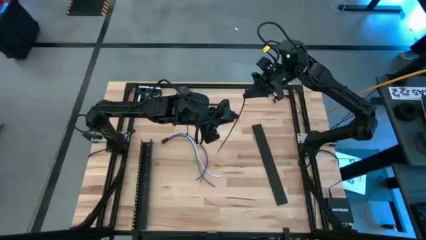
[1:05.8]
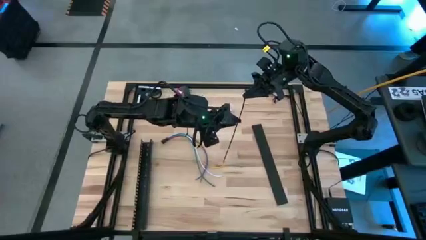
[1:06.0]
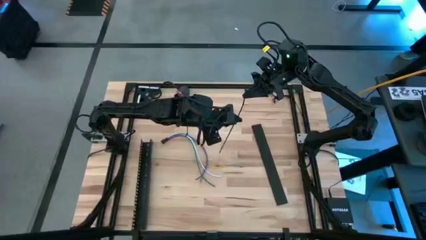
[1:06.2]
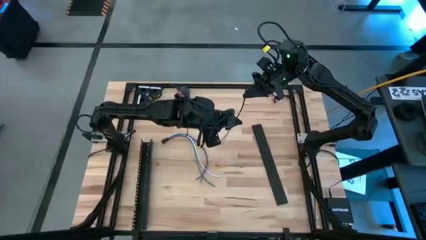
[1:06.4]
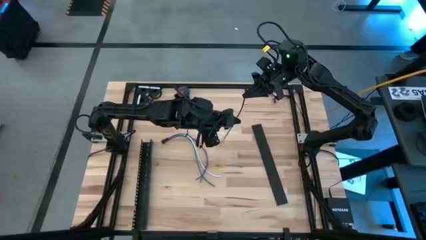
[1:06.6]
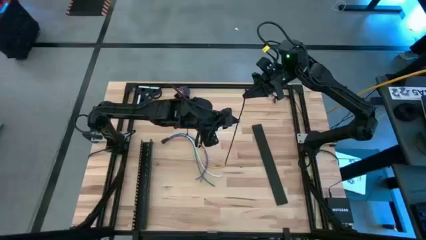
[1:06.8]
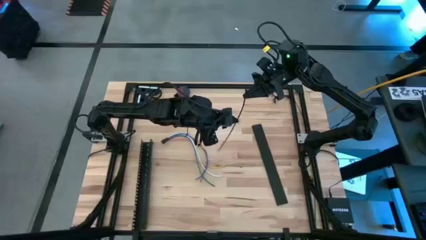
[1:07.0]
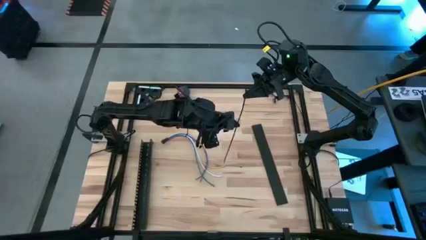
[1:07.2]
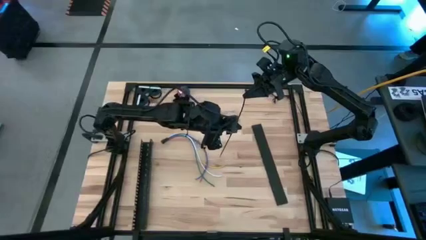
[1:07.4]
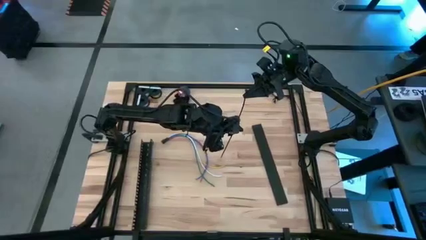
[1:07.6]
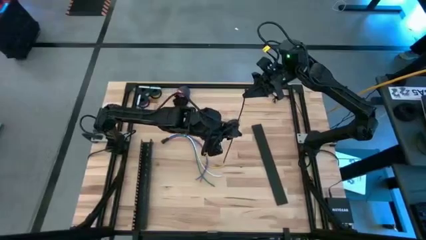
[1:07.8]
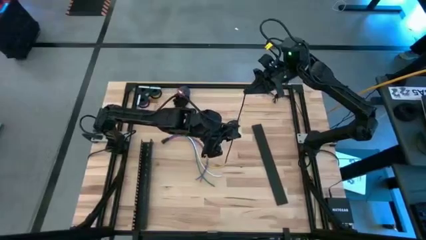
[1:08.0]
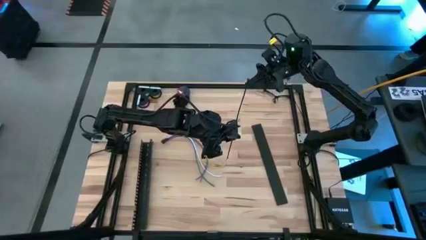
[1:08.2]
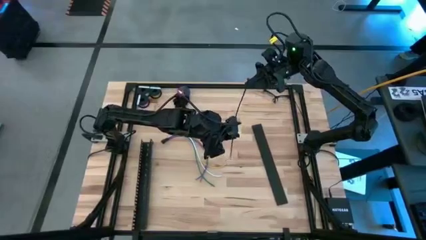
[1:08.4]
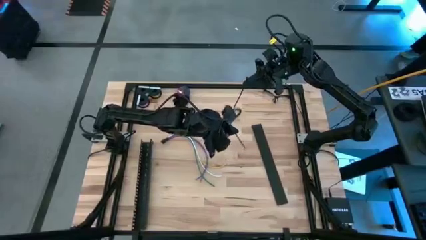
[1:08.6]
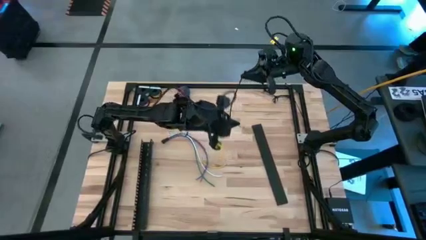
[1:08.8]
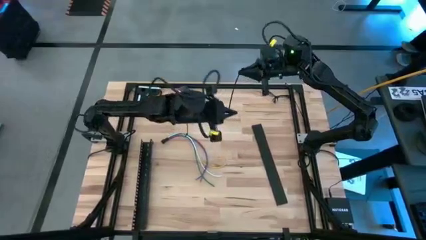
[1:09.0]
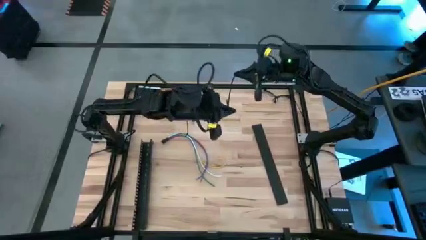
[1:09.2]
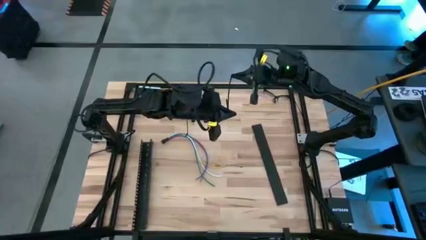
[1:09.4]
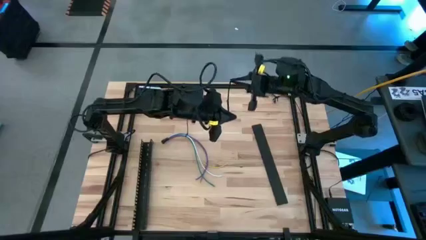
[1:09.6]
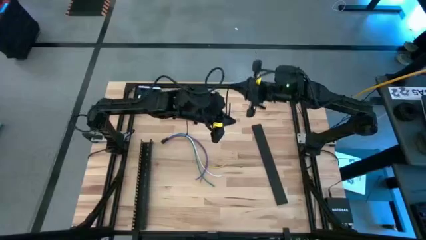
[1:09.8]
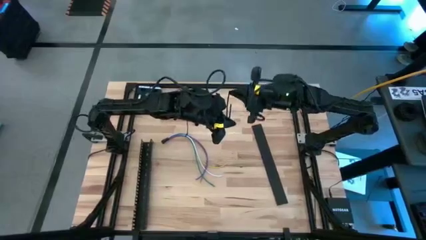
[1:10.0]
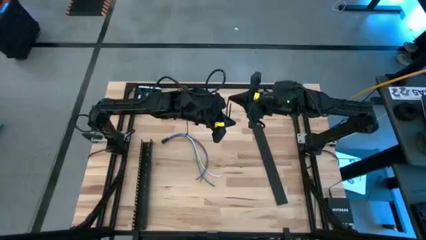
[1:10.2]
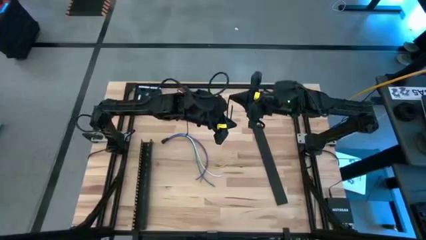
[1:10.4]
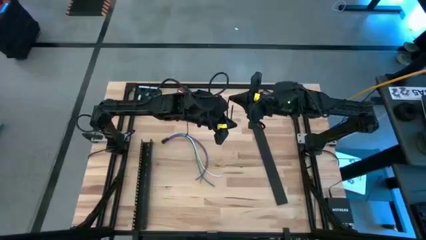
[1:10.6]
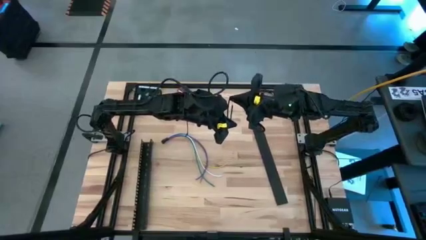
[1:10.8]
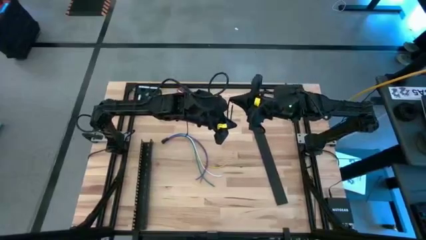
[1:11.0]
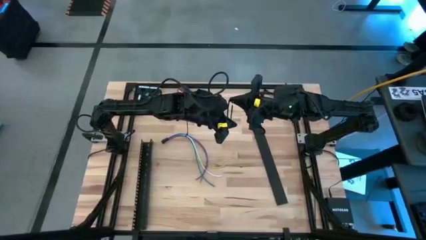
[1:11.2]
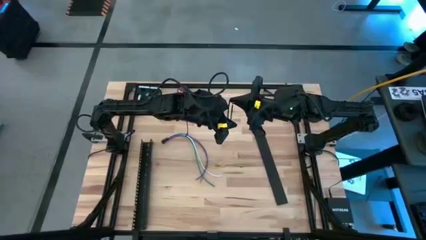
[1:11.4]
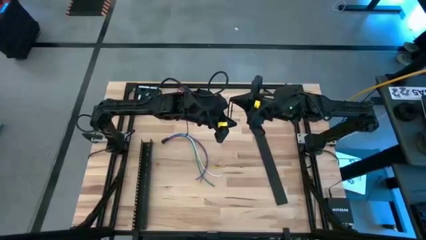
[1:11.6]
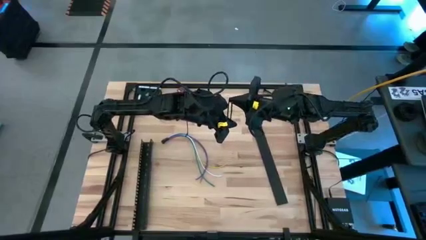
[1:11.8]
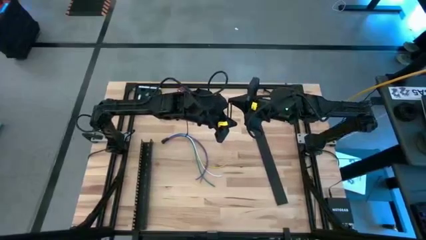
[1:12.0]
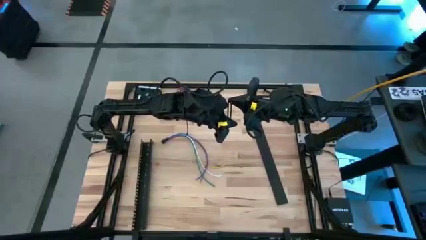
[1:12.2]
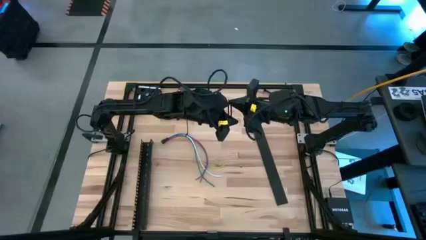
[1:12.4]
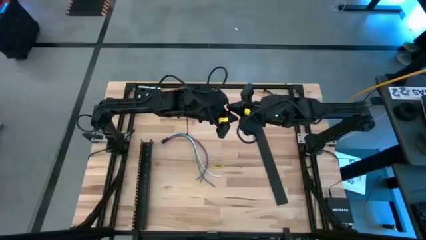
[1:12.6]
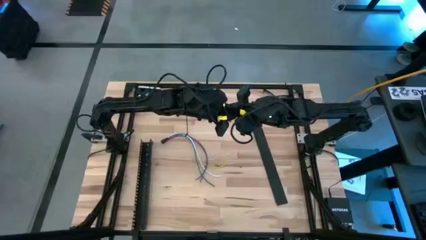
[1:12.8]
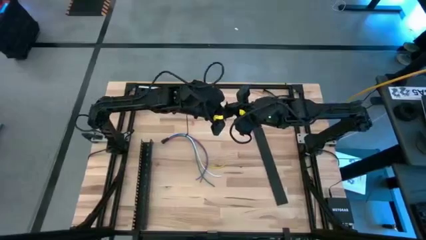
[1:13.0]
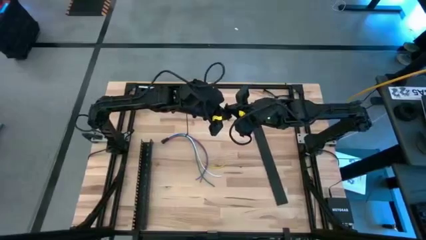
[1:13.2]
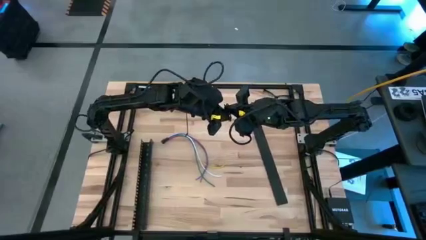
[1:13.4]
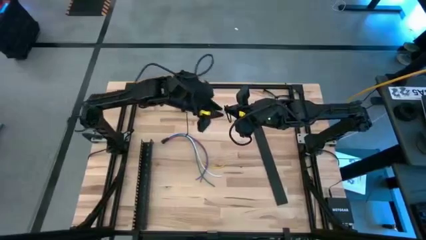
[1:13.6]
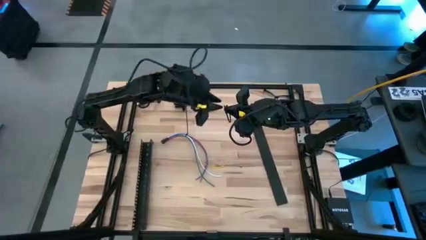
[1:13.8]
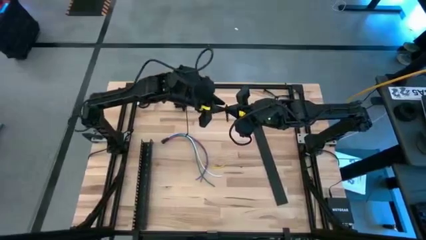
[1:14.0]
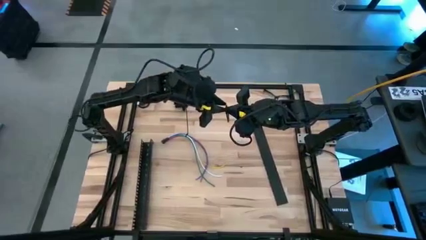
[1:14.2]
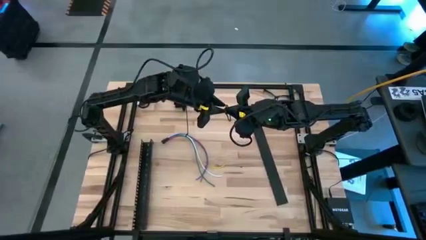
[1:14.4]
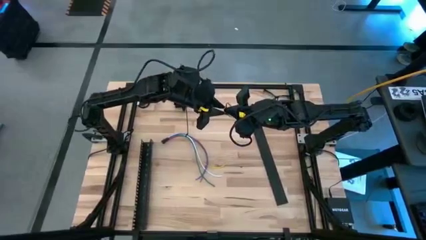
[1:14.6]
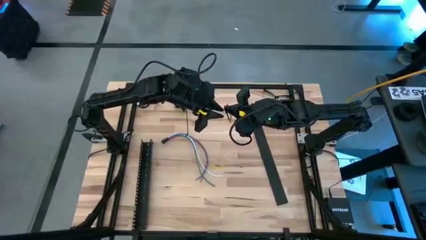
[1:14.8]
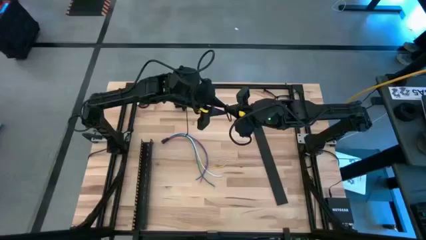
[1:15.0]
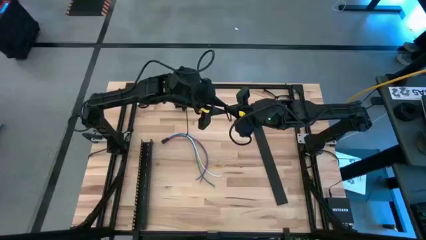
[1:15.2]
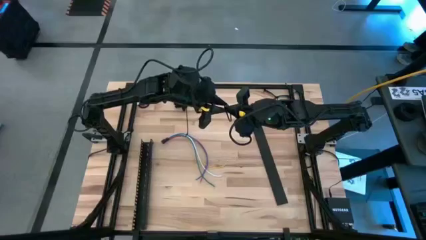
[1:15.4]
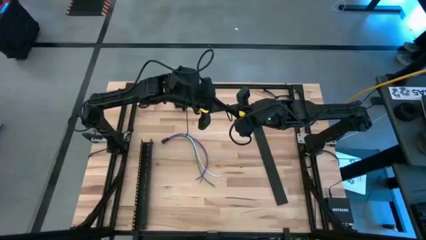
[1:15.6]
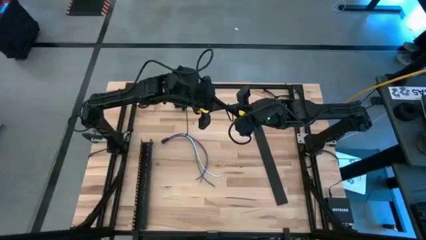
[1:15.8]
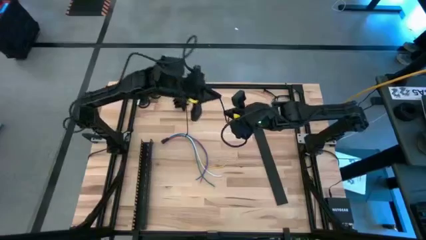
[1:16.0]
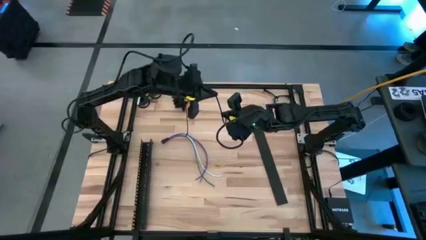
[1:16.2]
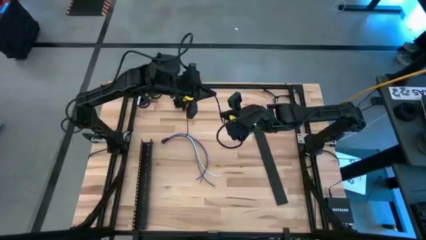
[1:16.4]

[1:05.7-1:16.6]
Task: Ziptie cables
Insert the black zip tie tail into the locking head

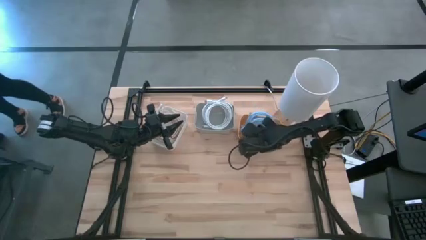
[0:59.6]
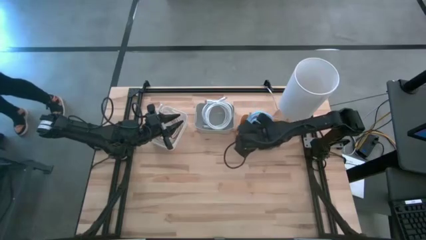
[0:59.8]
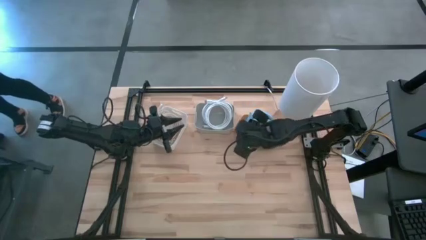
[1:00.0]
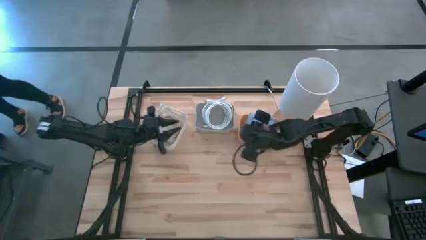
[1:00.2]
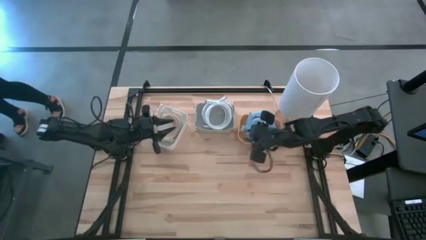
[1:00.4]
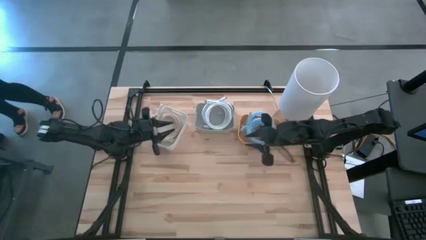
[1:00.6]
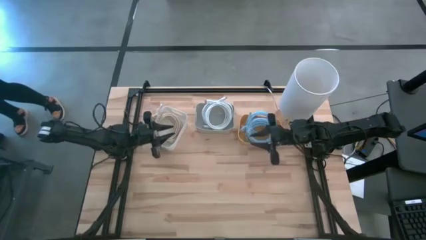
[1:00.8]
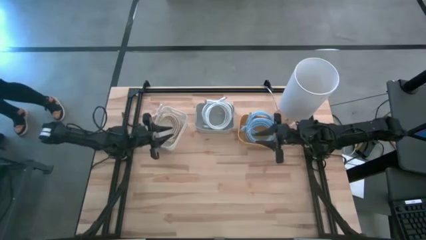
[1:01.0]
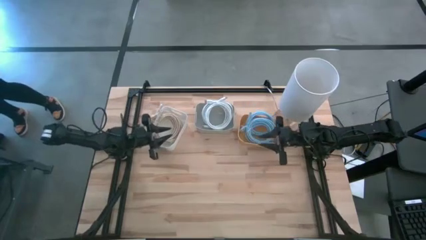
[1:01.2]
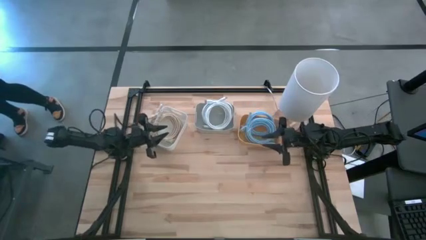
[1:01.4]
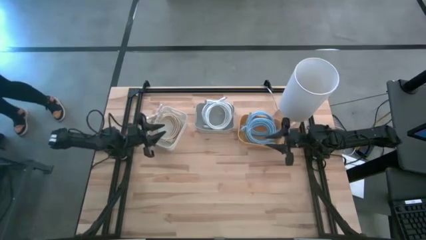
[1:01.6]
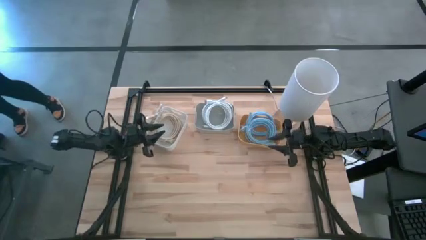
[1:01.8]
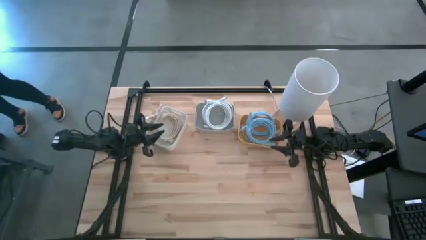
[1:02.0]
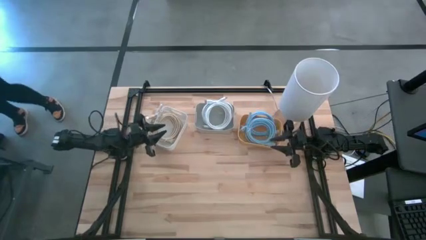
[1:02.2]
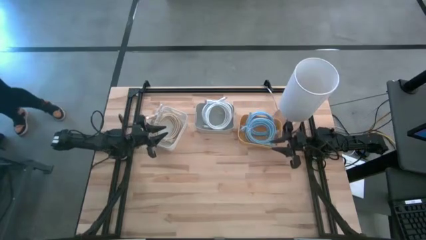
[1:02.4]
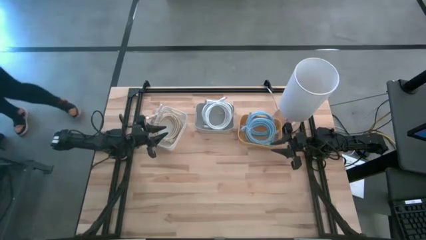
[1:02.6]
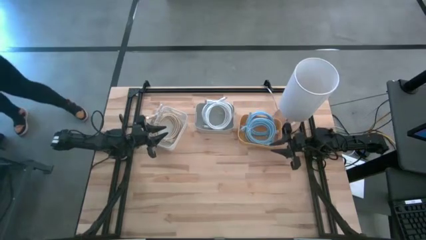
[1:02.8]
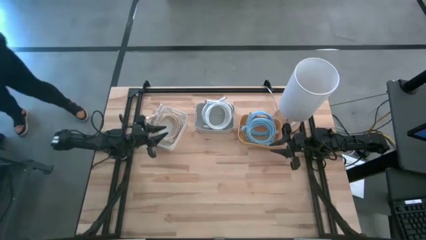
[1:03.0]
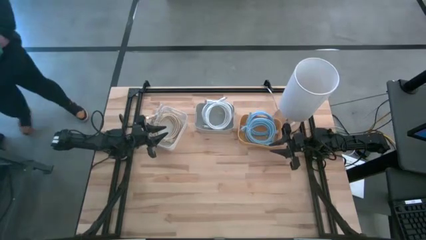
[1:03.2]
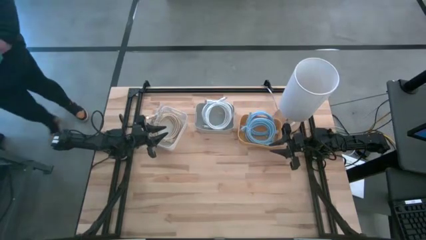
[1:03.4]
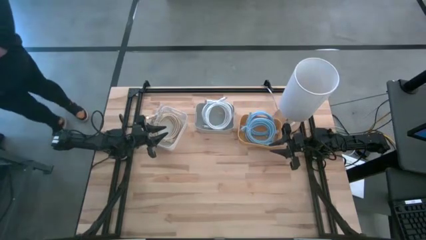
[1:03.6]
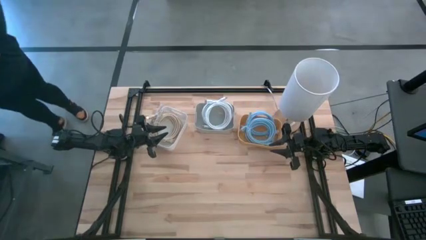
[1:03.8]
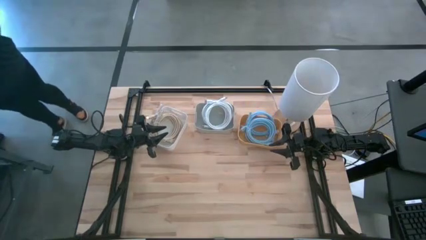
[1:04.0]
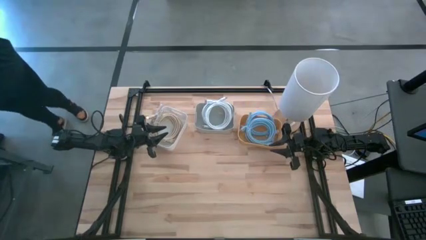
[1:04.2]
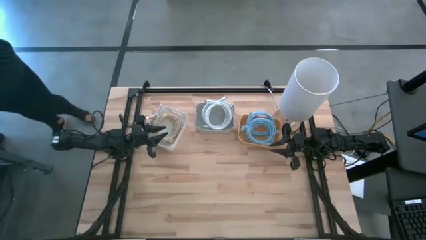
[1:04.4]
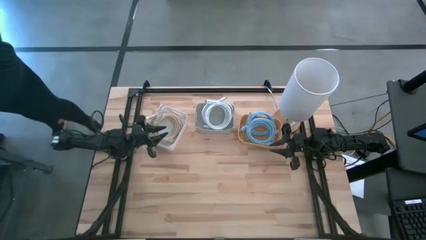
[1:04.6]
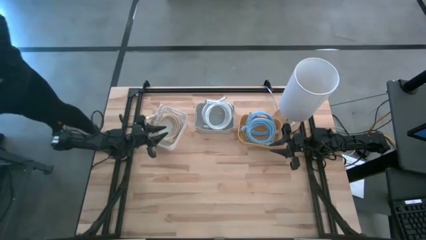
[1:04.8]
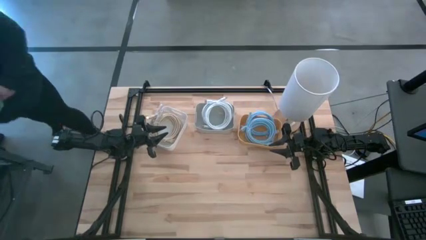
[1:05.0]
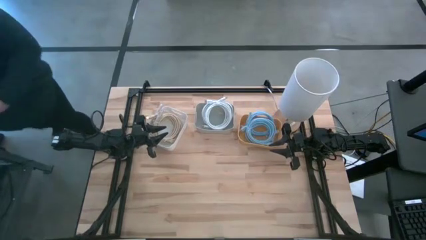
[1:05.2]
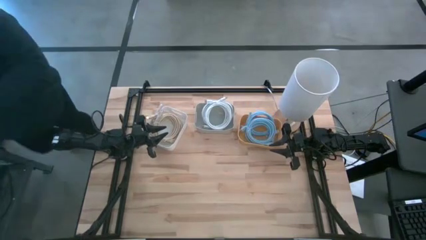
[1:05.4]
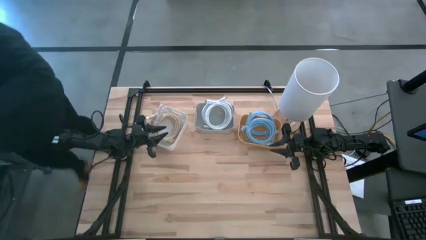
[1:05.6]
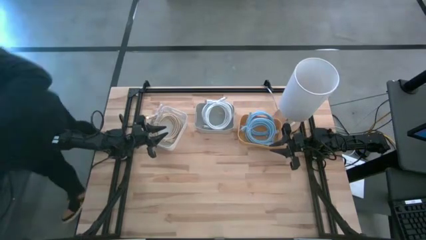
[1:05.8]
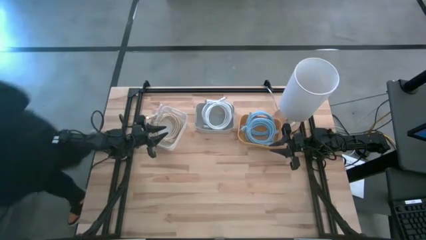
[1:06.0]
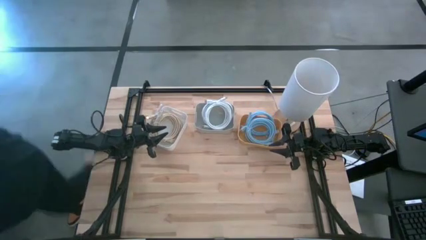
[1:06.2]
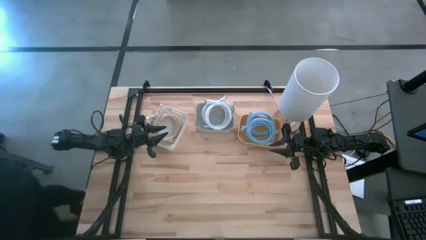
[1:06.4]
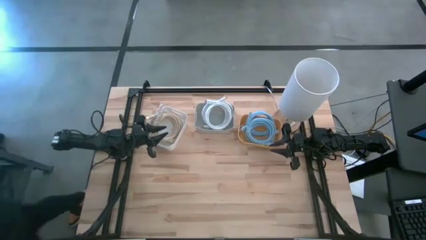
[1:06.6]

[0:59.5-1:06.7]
Task: Sort HDMI cables
Return to Home Position
